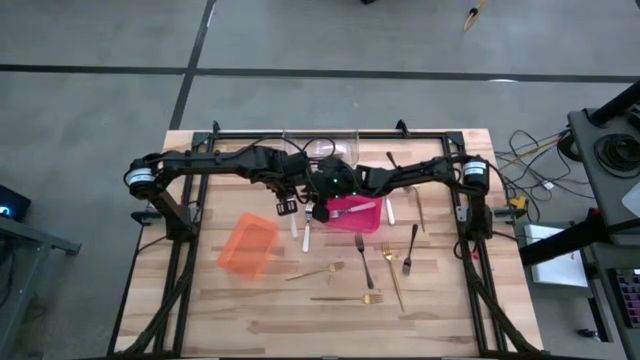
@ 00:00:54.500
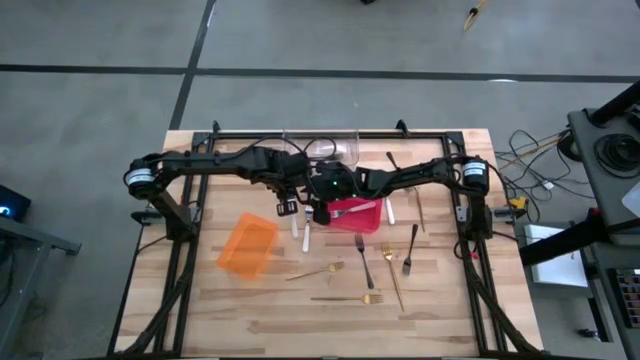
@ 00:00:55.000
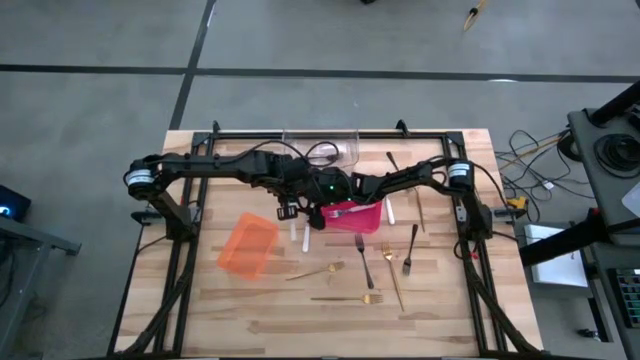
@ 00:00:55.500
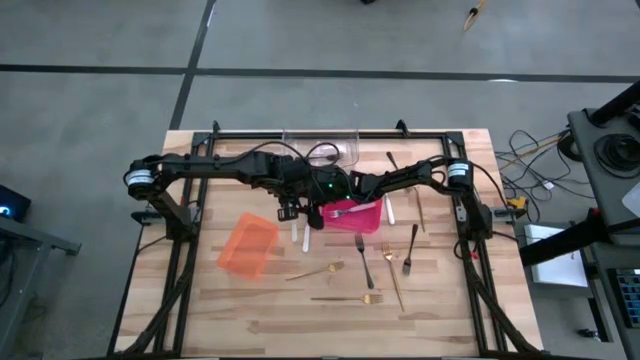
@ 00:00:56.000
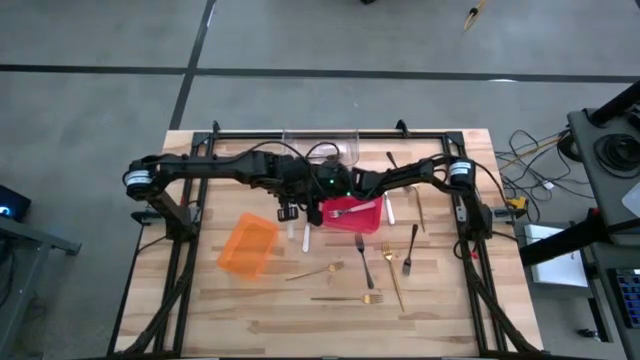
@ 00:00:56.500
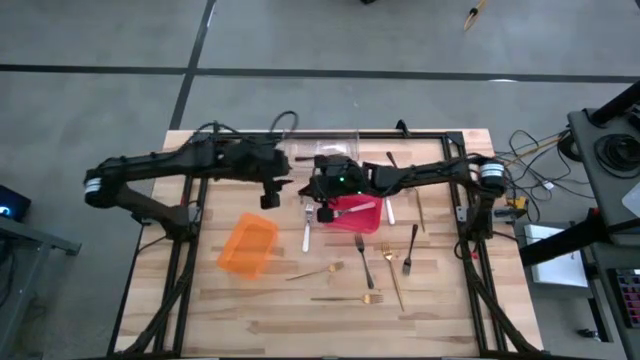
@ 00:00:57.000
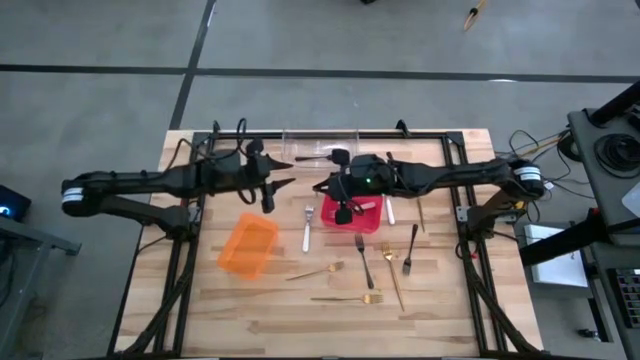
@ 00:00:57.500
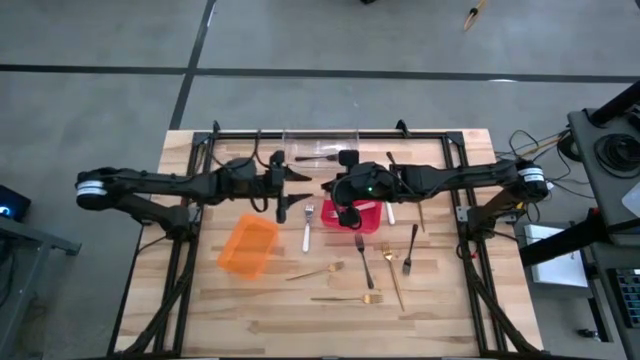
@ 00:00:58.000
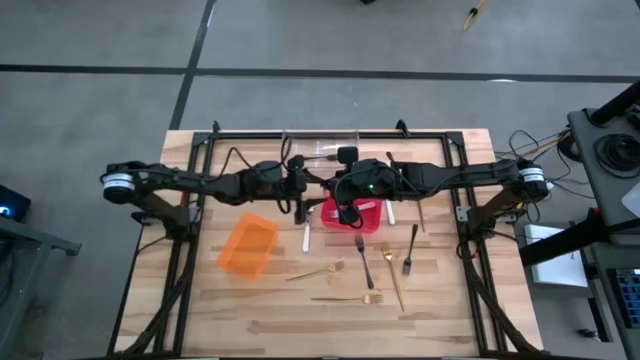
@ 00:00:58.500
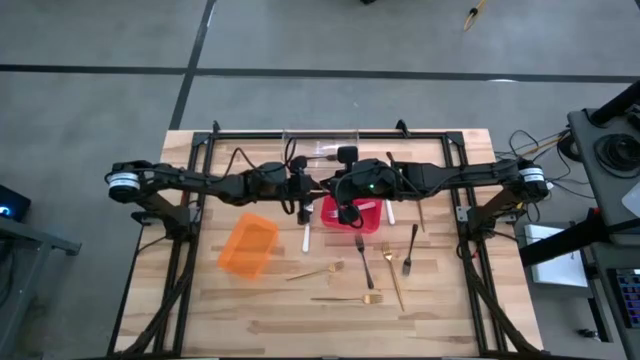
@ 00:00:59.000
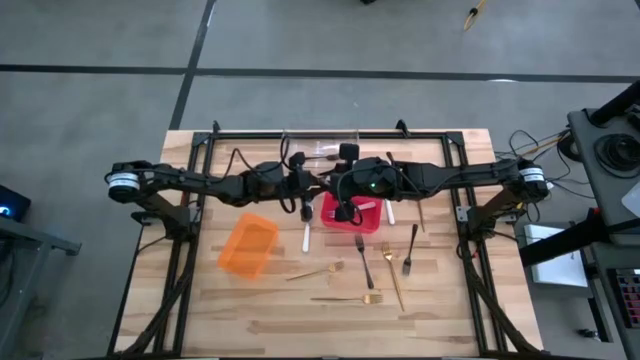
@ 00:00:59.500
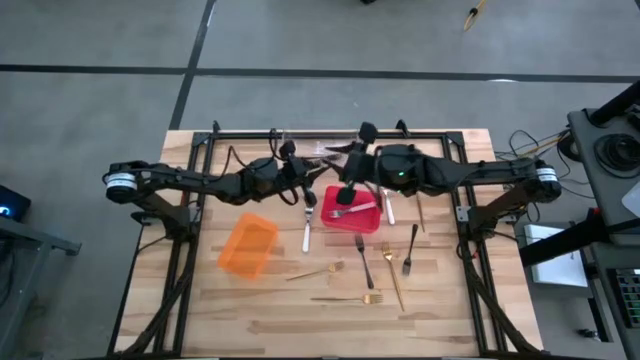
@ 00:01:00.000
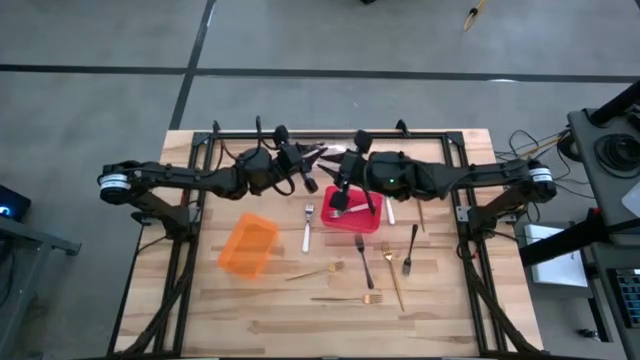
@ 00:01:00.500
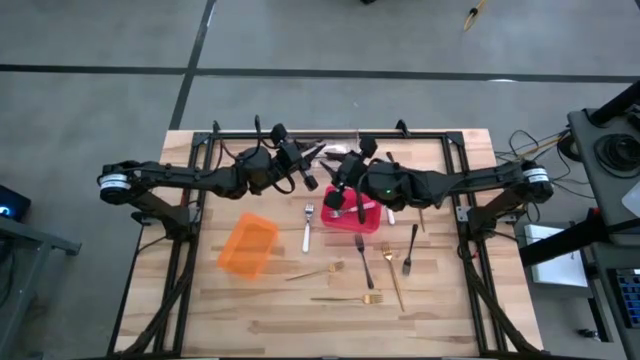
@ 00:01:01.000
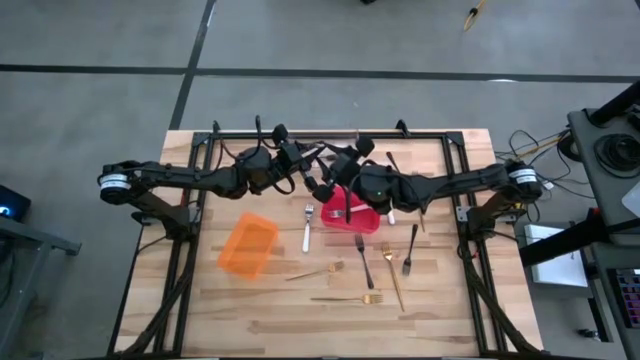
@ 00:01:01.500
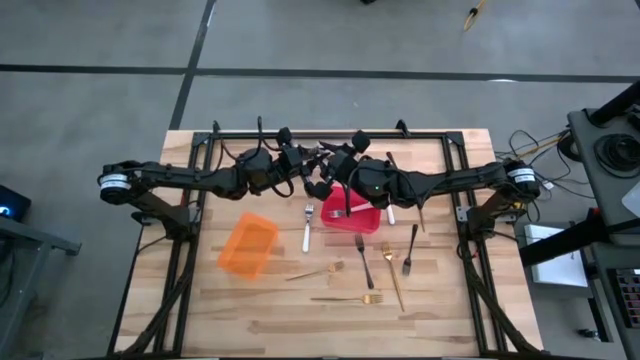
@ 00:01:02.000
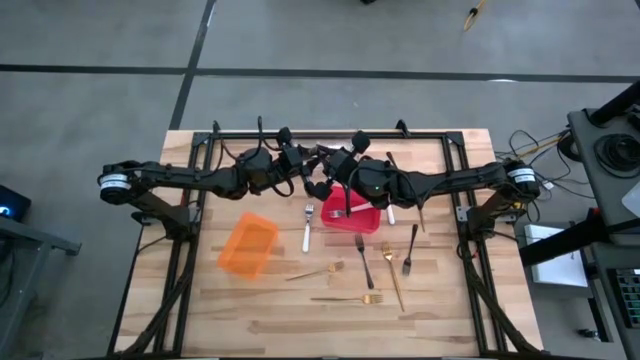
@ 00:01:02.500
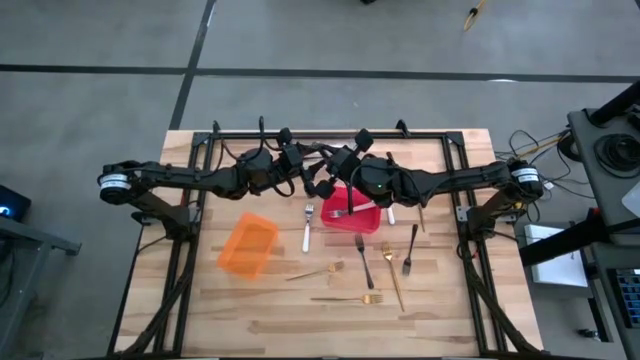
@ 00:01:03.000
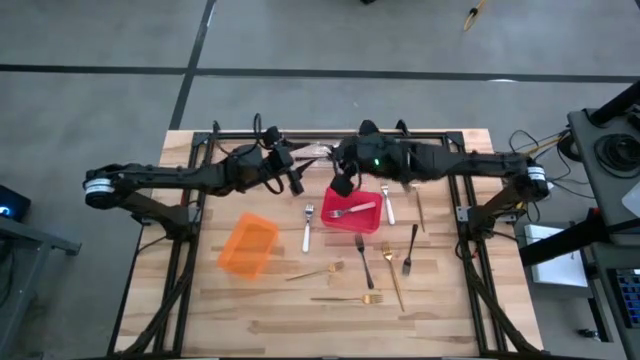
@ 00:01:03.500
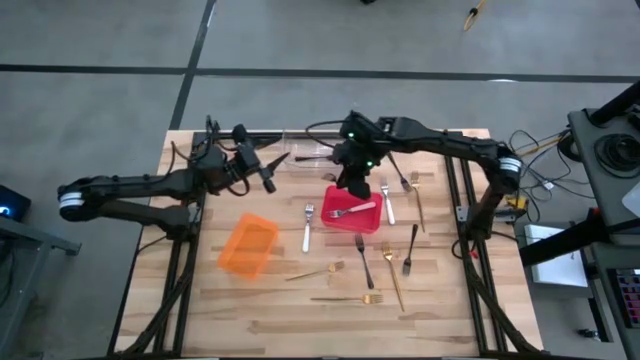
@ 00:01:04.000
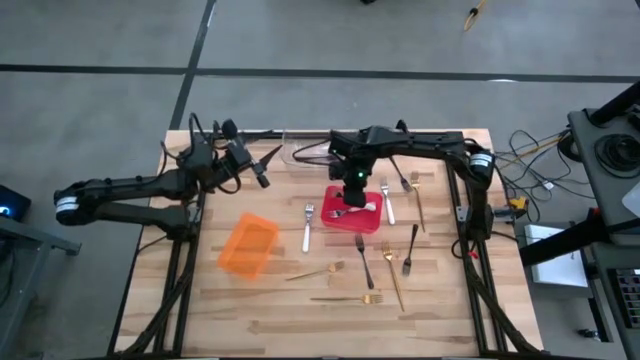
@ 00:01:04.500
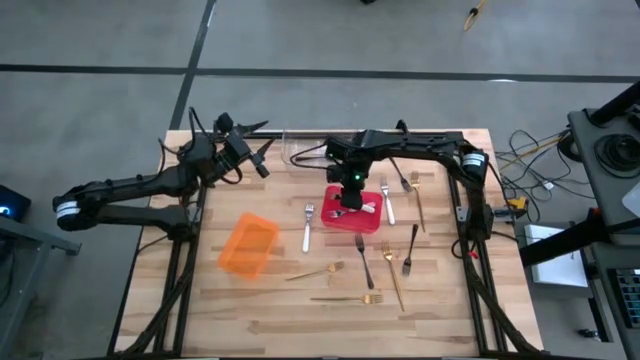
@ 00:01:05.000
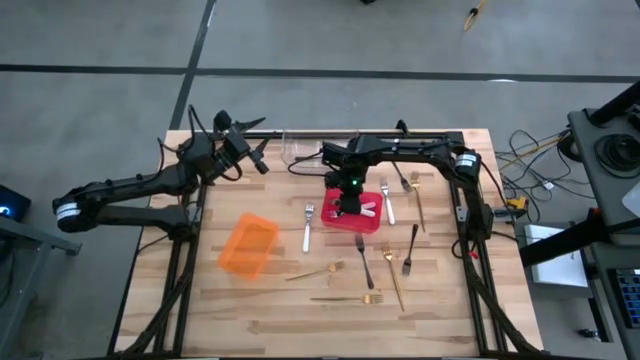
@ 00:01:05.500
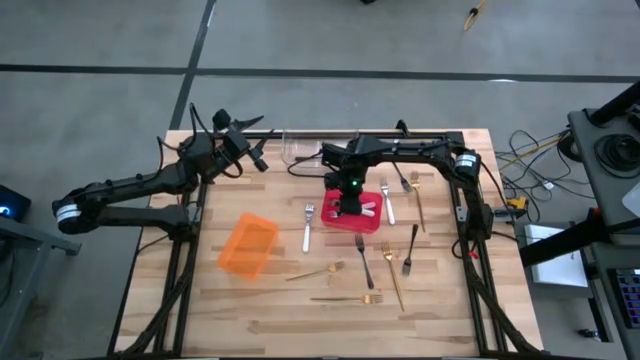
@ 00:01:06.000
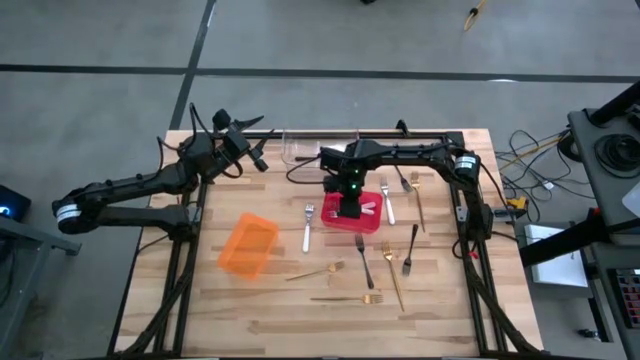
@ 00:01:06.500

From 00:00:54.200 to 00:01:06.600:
Task: Sort silverware by color (type)
Put the white fork into the red bin

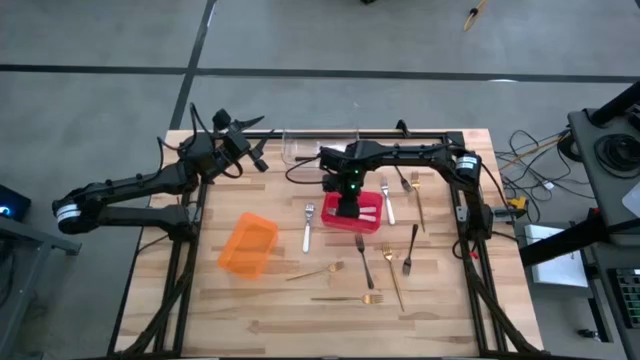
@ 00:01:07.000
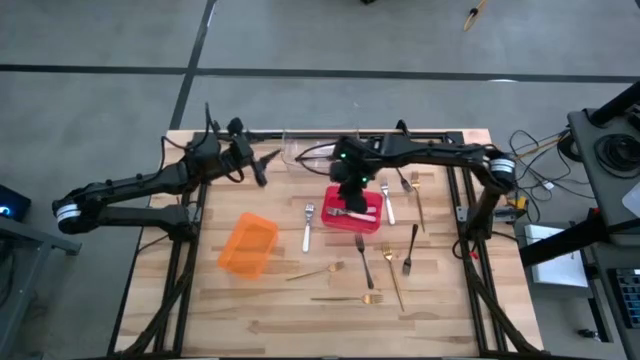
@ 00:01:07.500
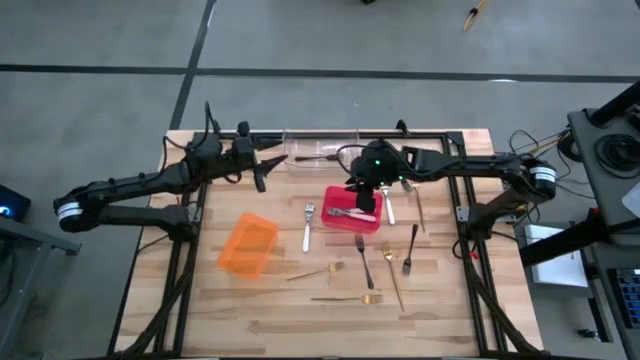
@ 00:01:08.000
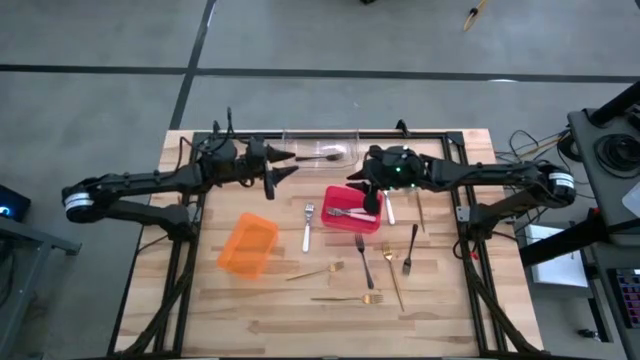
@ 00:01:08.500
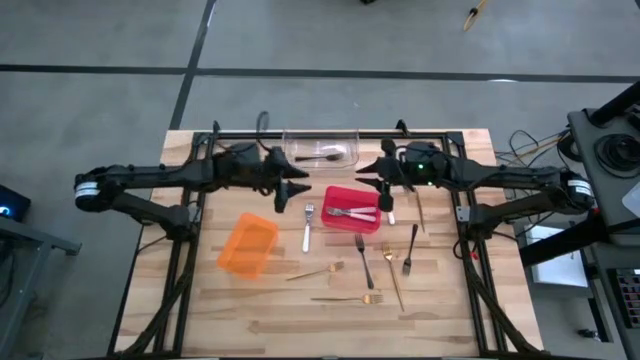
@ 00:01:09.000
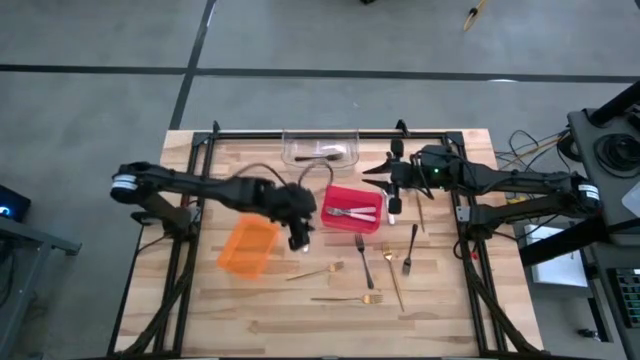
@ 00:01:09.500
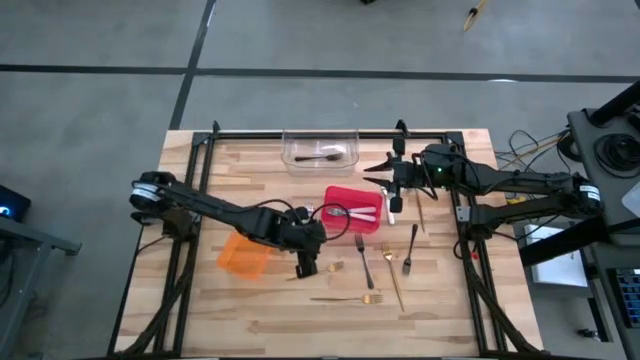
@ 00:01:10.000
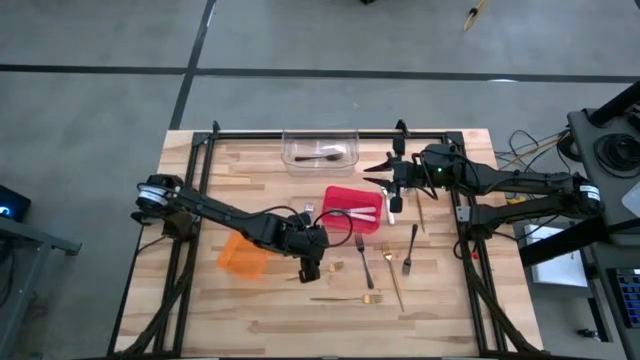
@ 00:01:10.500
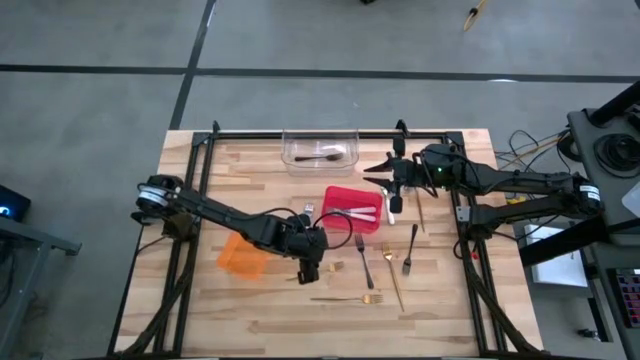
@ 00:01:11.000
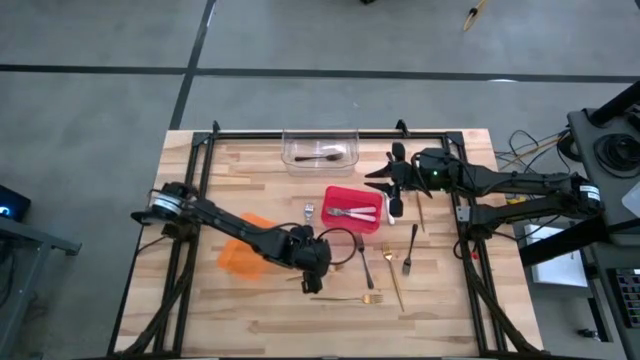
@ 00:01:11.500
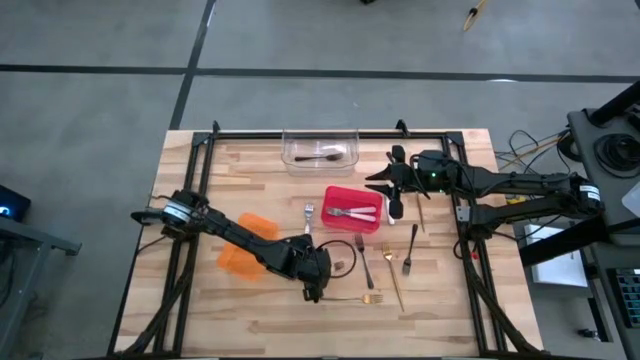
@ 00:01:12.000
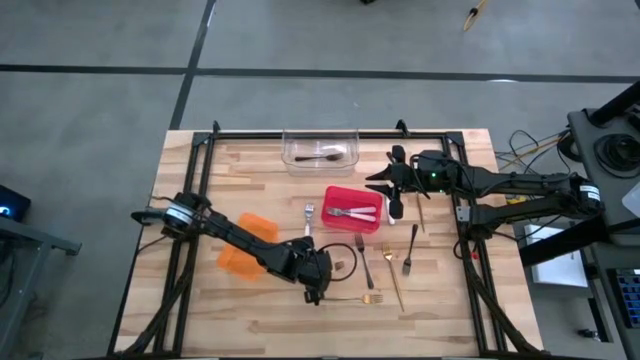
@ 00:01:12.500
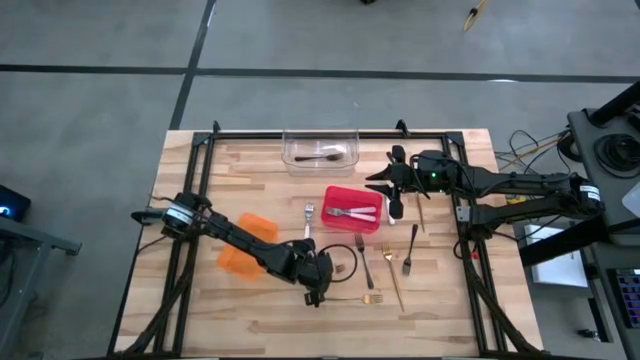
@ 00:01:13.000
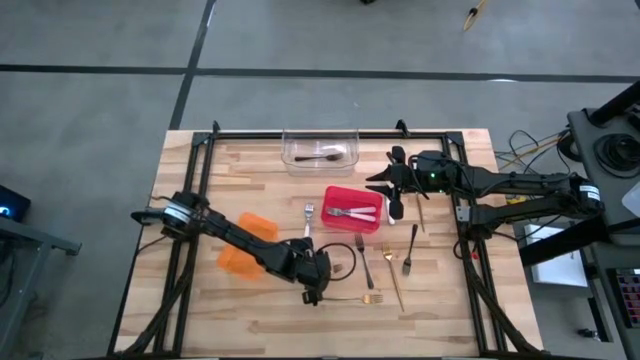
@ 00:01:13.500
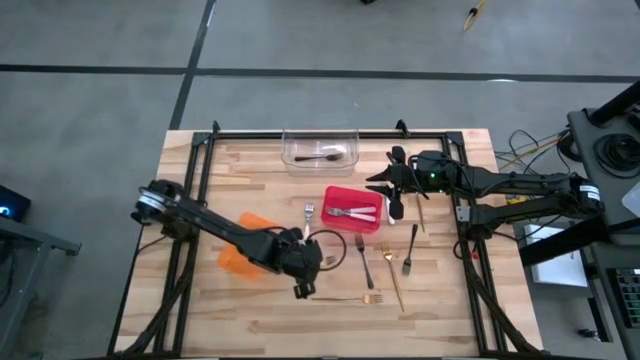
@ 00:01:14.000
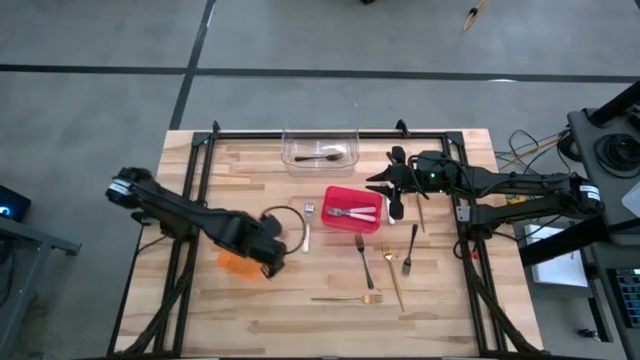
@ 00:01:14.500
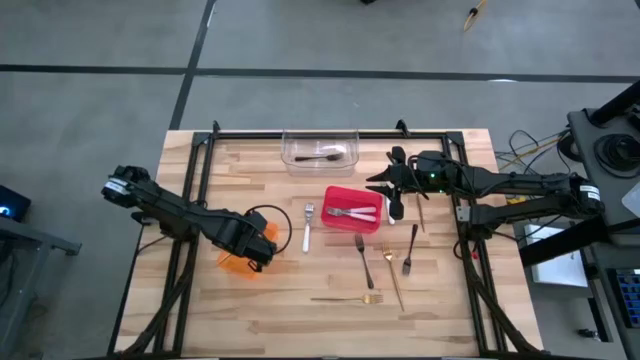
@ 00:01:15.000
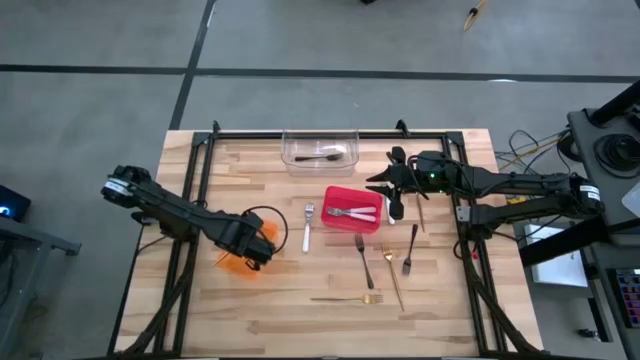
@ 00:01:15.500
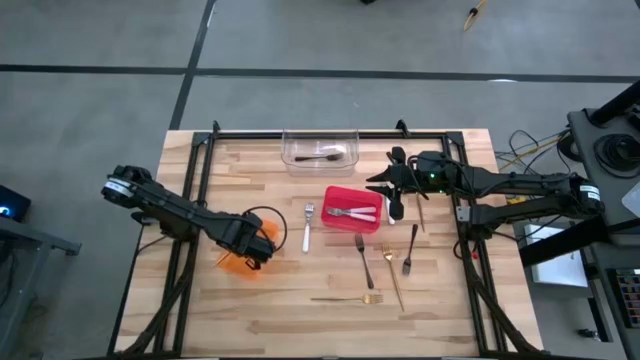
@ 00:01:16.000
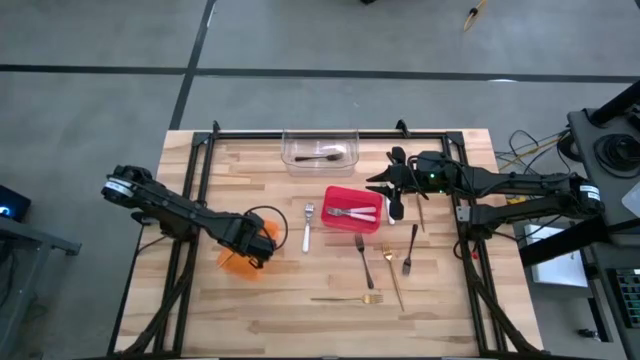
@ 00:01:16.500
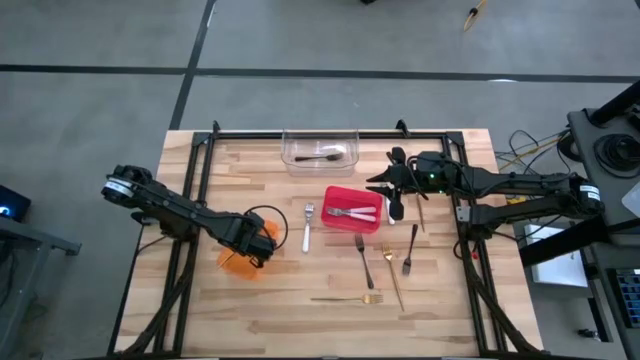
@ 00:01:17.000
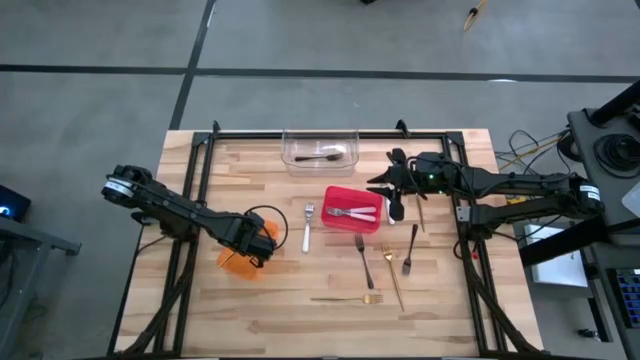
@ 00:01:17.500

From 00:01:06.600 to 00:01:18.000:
Put the gold fork into the orange bin
